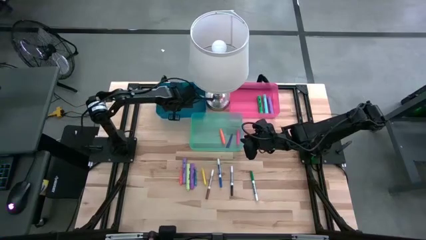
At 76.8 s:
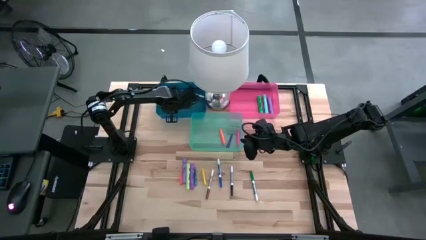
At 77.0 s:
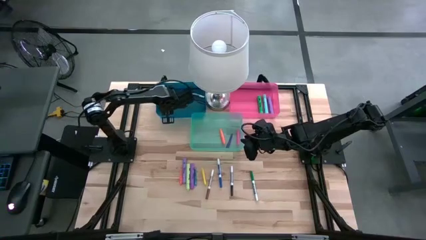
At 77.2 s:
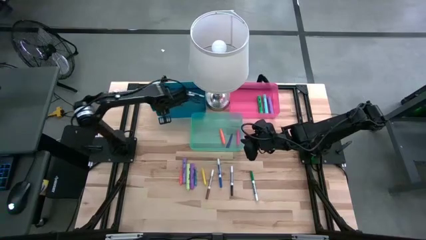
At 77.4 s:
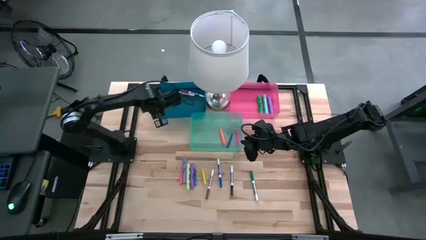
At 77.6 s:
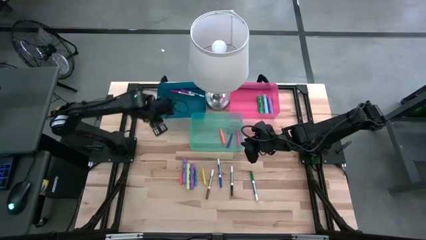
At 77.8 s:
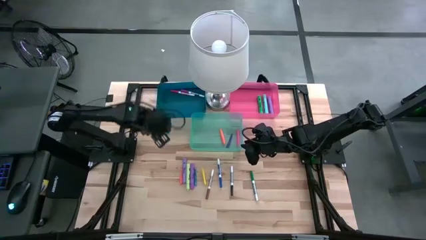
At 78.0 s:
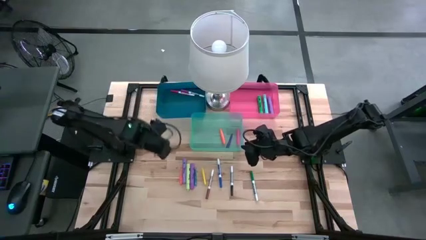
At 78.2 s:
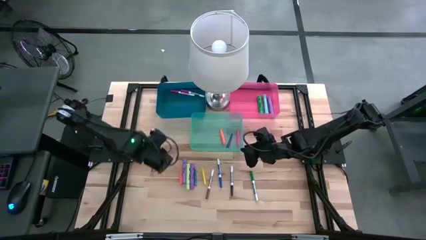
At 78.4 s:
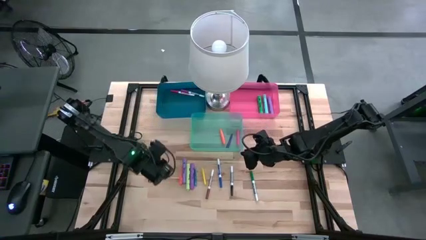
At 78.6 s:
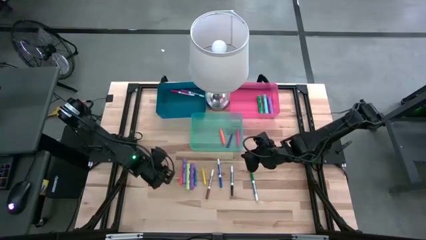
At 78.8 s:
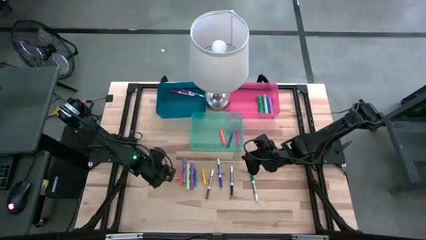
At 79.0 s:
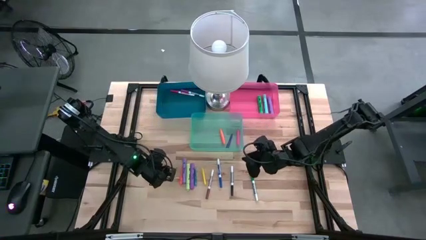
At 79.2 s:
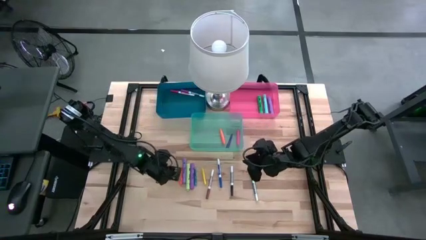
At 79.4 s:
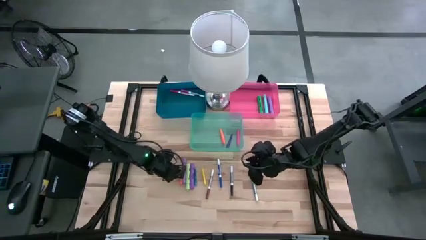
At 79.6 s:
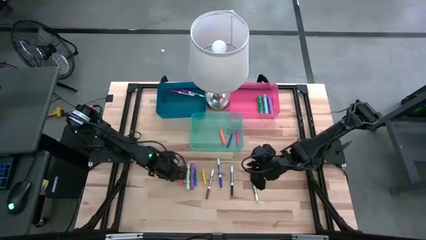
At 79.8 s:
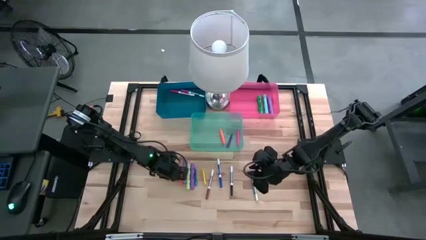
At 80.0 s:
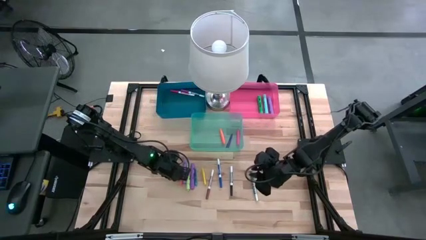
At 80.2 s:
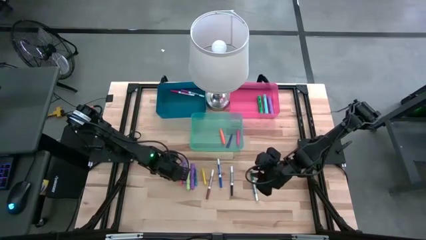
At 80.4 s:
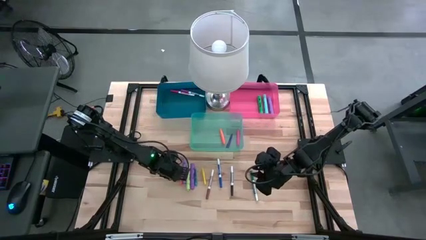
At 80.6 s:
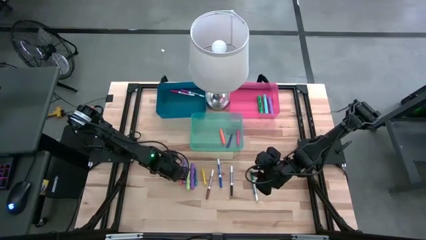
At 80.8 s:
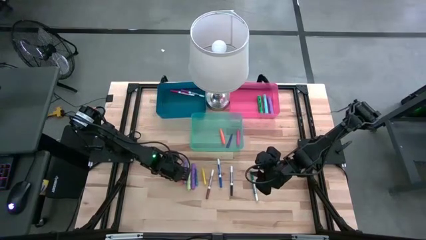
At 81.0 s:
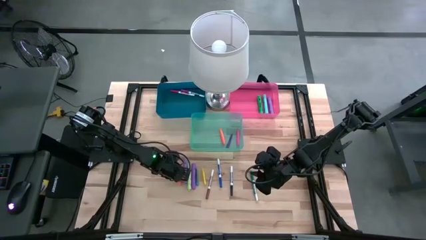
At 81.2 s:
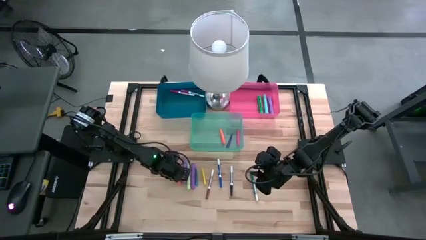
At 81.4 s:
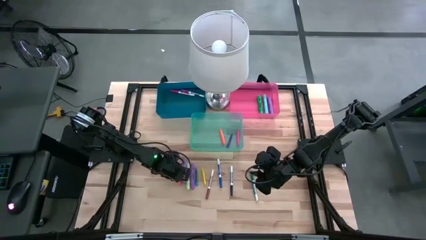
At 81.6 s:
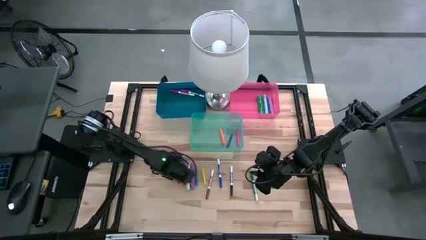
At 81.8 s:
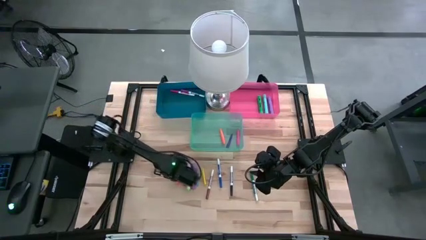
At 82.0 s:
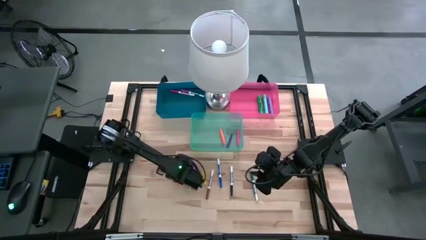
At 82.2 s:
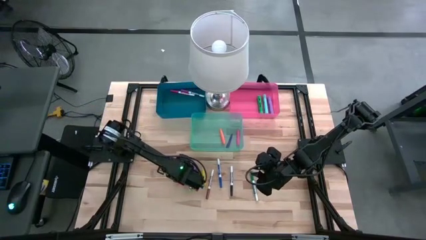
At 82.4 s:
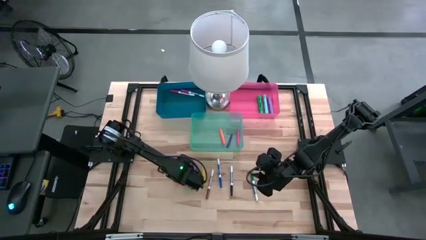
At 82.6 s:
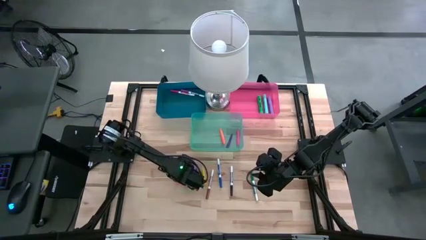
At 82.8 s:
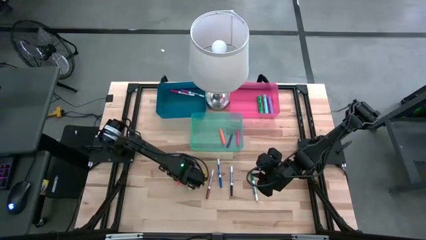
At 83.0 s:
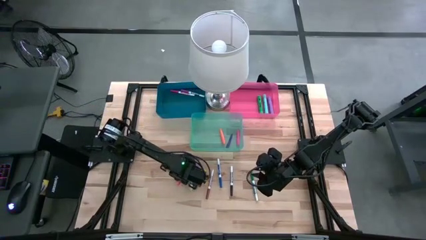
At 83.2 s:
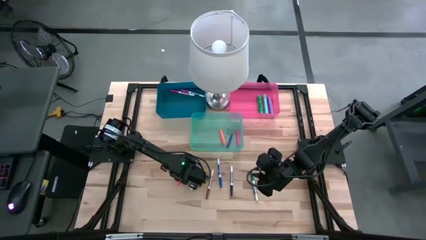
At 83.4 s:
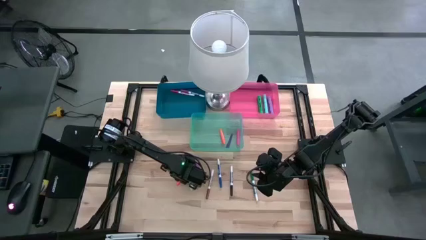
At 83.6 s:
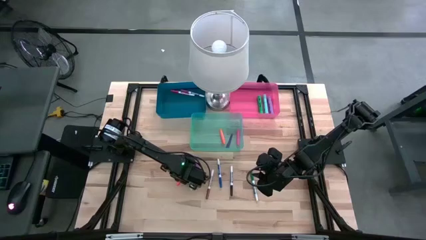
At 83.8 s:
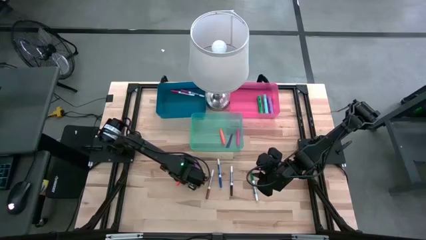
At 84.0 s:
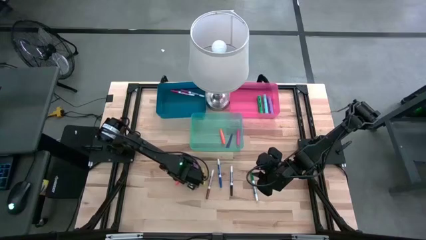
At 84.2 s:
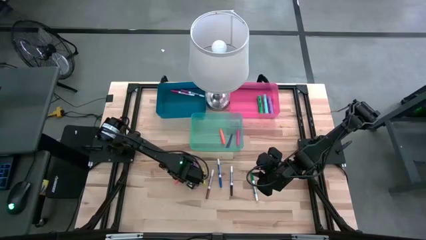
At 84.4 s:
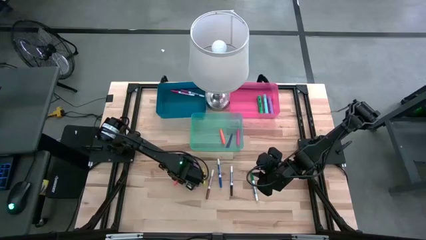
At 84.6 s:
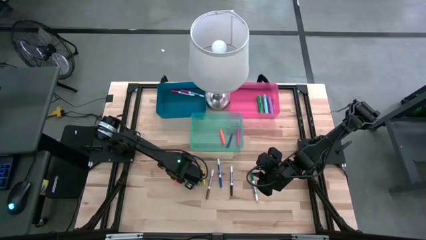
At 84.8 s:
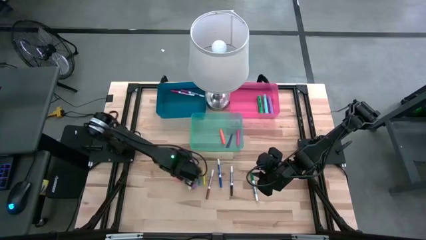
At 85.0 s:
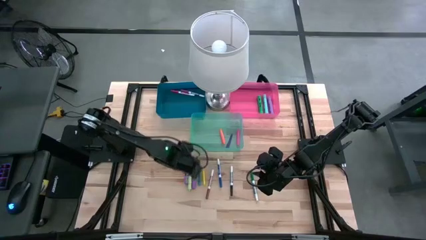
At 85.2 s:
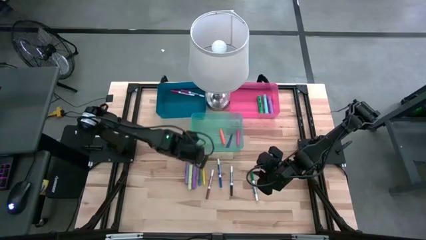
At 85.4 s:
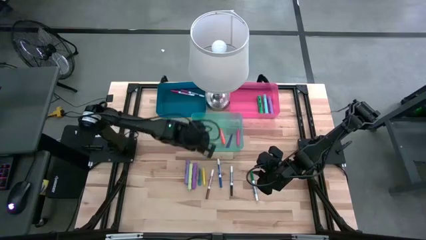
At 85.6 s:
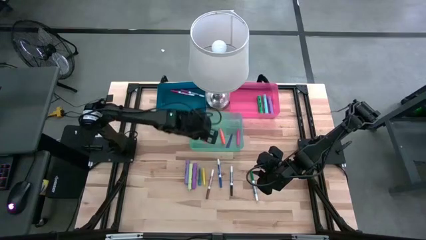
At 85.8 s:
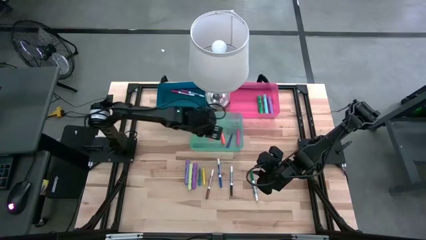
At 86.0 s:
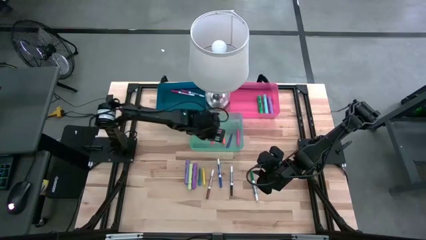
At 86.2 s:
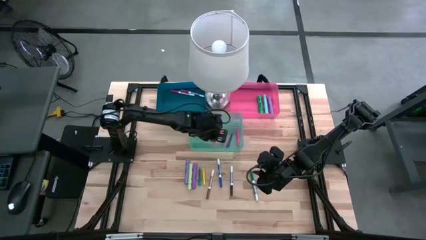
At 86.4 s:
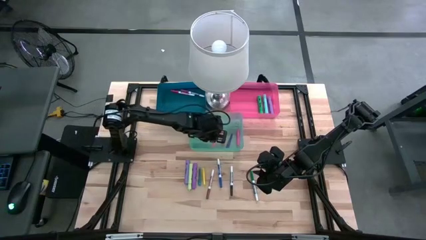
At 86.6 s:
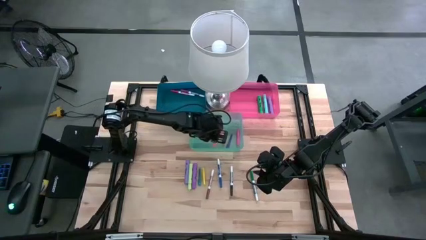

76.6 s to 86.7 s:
Task: Pick & Place Markers
Put the orange pen into the green bin

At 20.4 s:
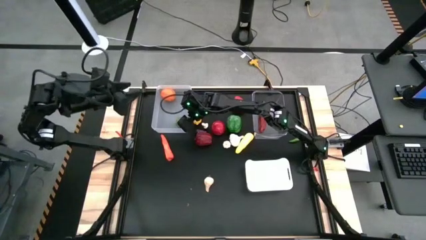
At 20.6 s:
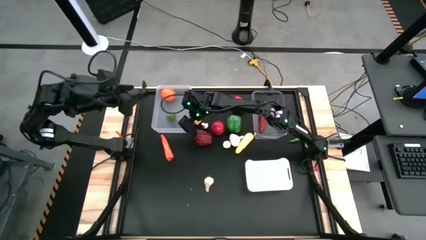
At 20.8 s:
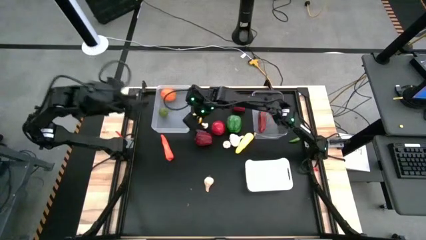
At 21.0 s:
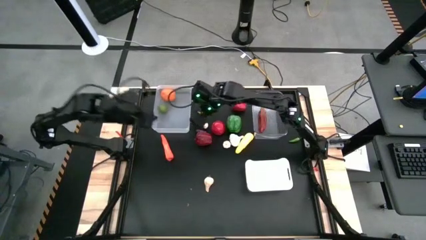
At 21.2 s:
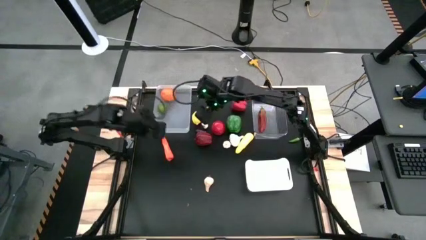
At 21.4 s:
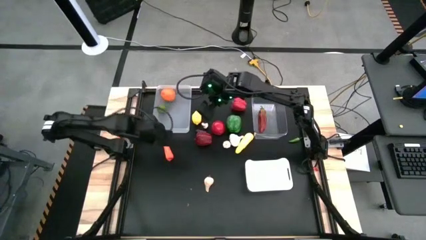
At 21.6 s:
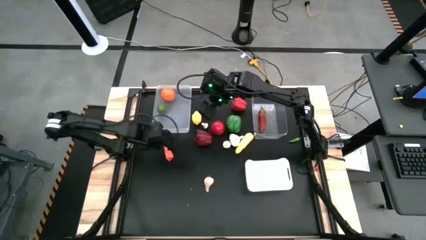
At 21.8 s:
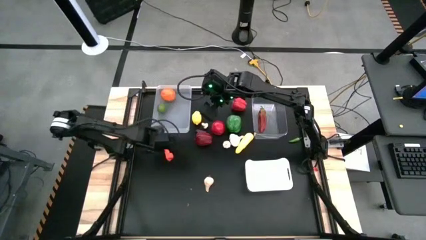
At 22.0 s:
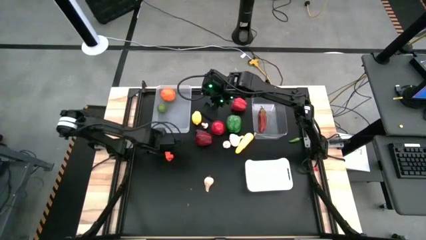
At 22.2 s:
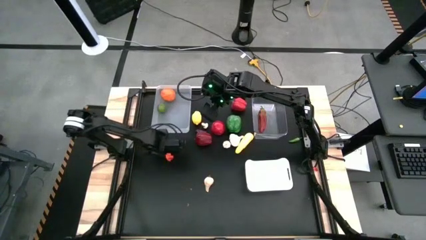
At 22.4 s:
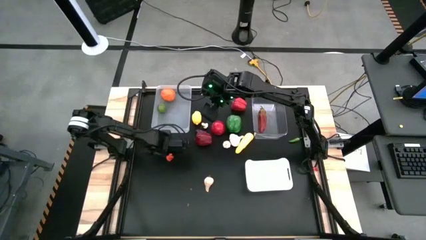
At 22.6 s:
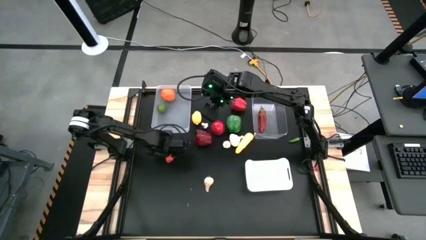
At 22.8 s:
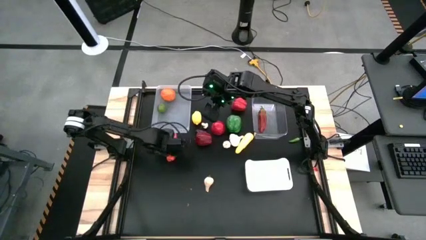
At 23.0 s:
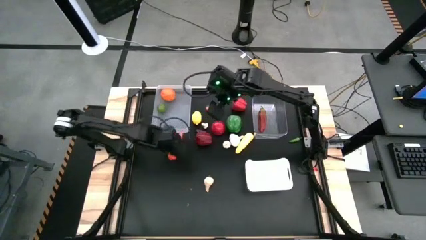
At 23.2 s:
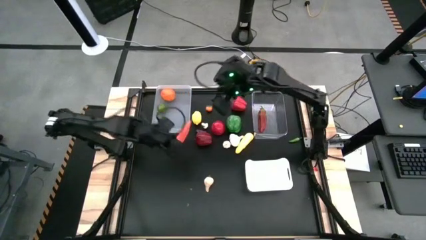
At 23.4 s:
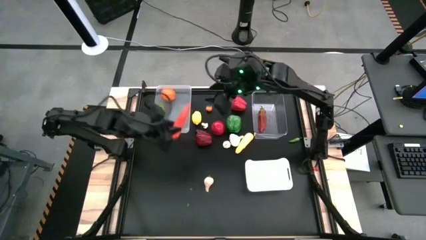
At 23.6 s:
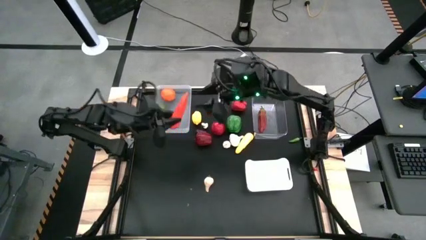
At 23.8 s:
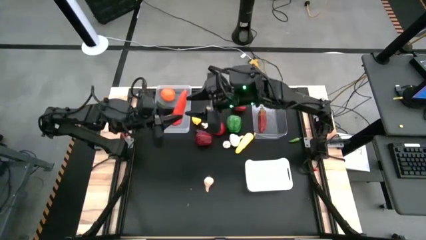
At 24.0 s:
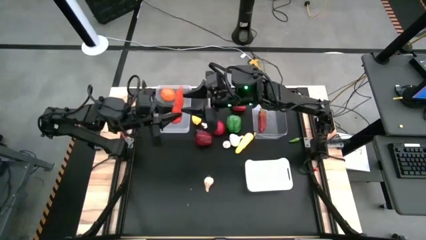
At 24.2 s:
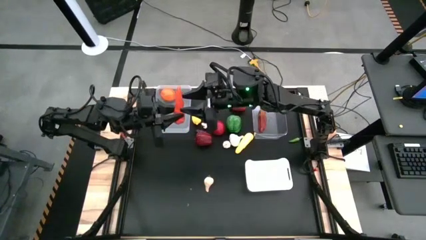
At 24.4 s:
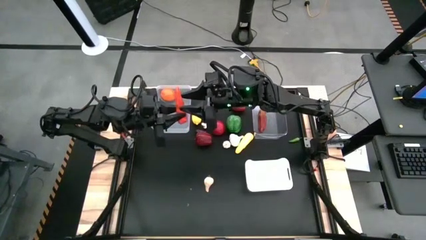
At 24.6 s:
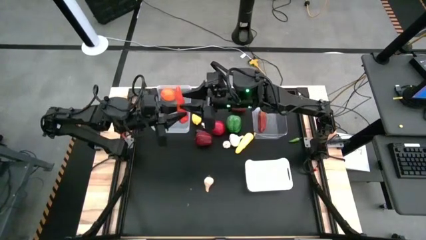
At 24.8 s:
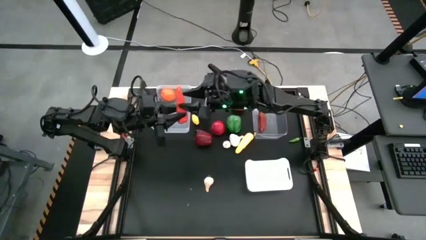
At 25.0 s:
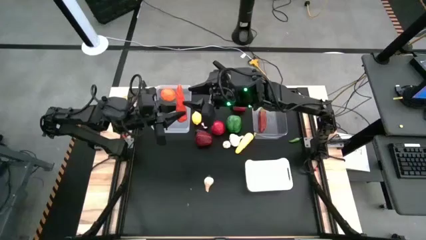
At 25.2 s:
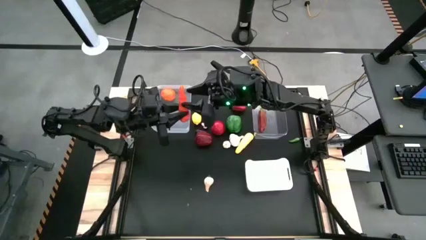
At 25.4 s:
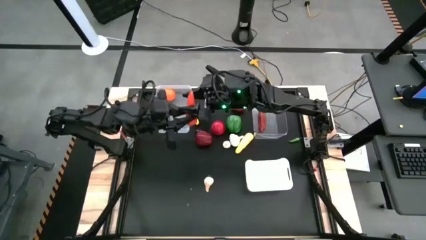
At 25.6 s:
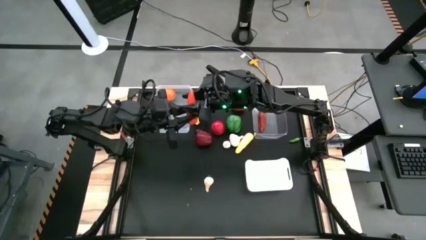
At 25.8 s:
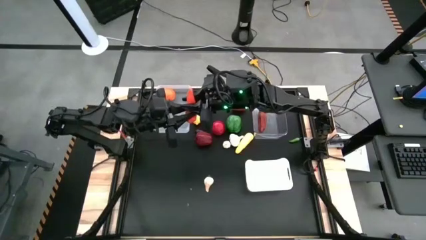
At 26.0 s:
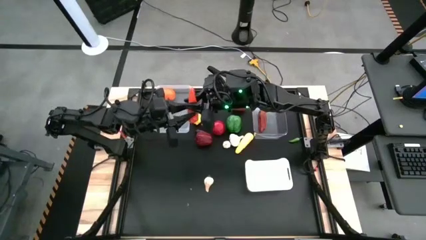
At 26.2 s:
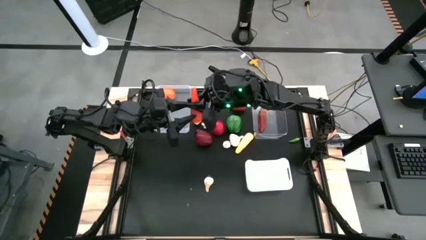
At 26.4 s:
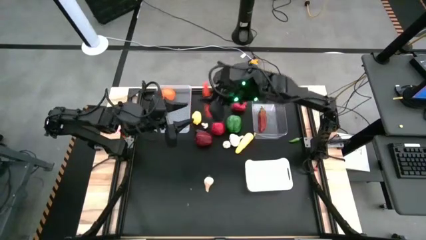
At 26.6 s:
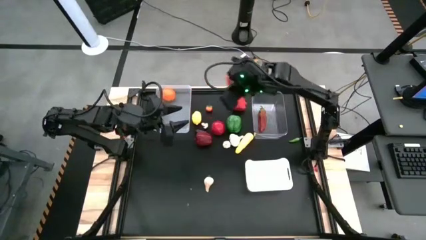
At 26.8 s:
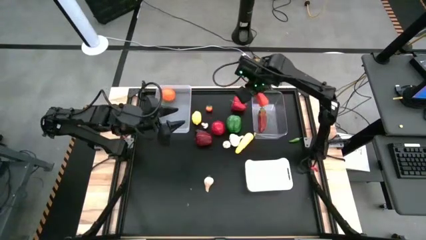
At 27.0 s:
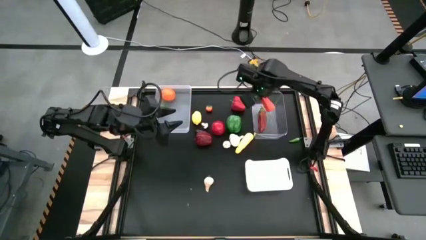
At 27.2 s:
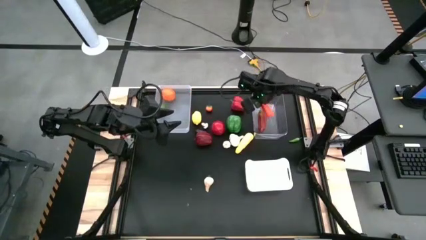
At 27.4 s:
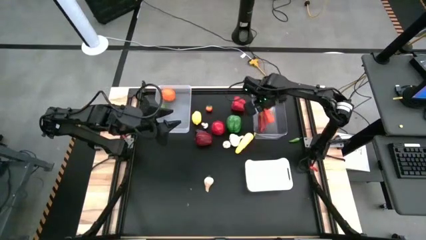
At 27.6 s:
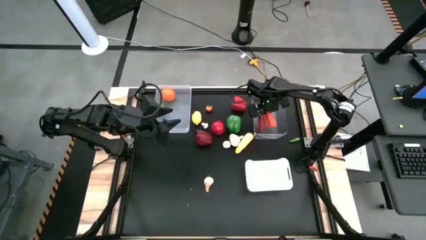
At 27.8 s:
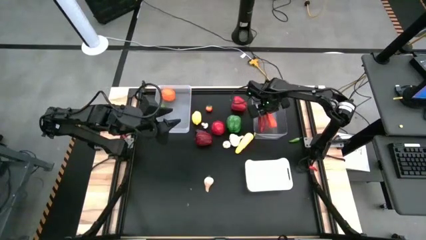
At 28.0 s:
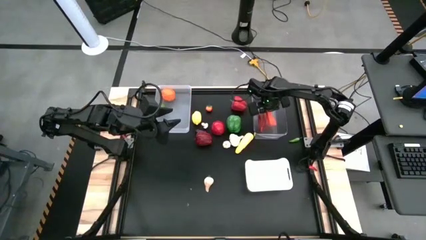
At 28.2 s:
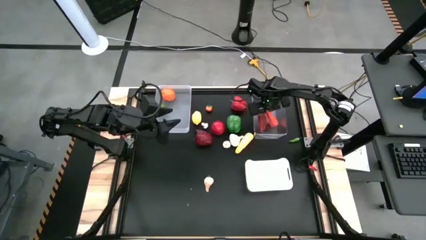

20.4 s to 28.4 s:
Task: Sort produce into baskets
Put the orange carrot into the transparent bin
